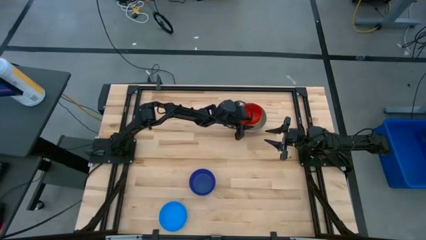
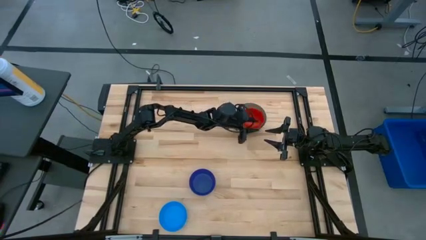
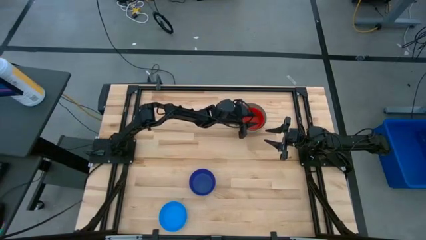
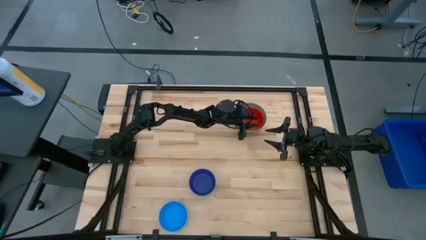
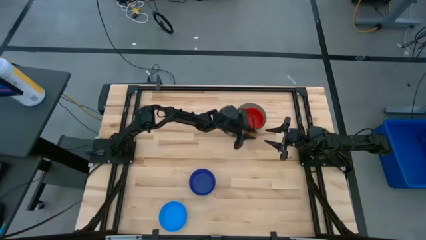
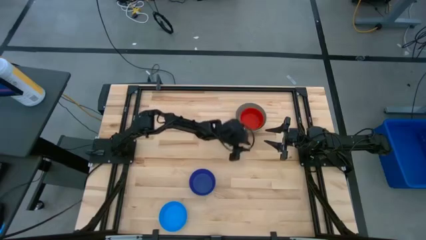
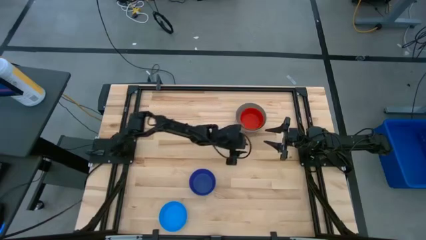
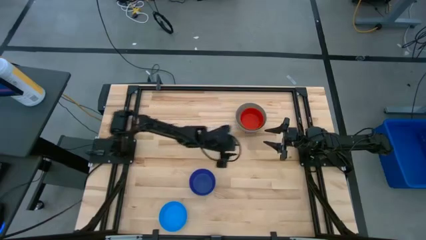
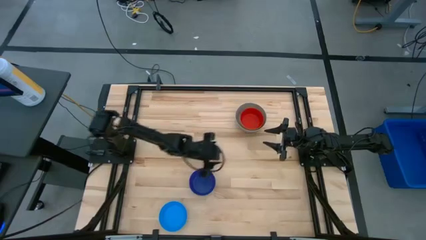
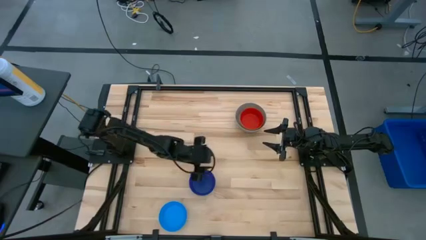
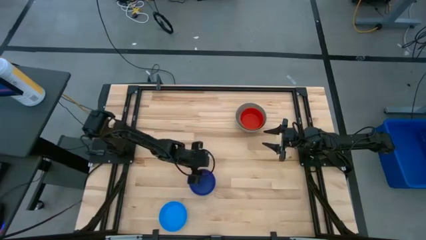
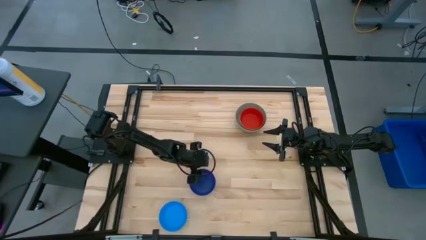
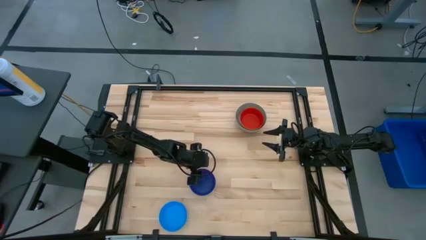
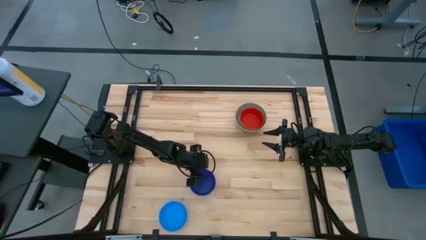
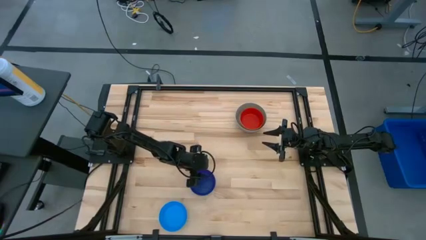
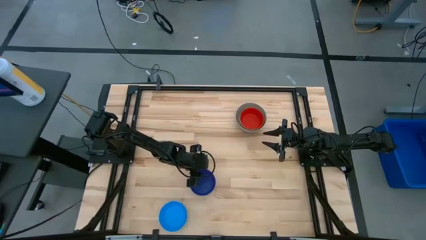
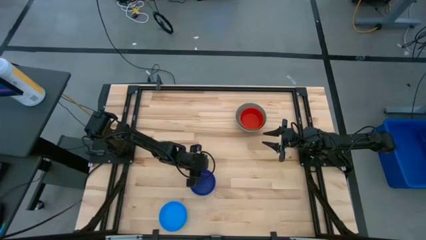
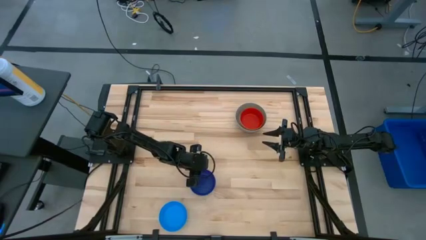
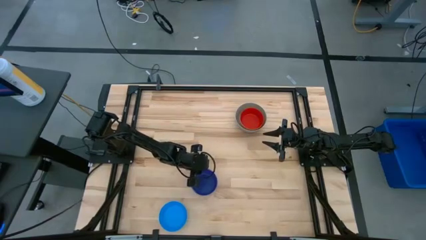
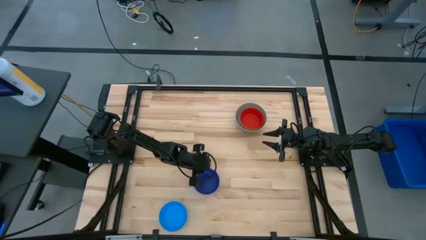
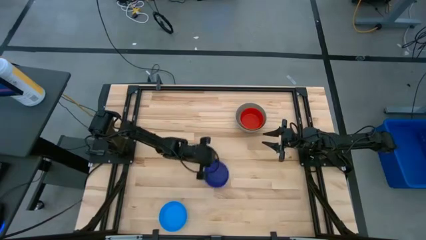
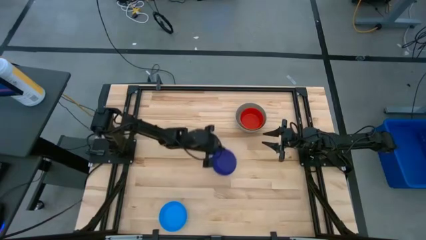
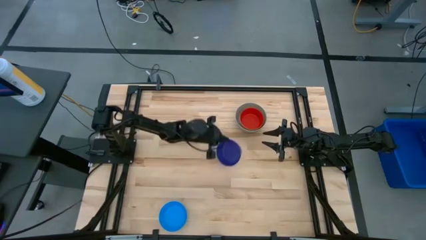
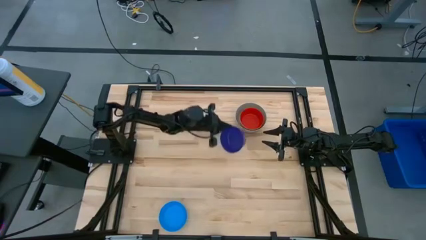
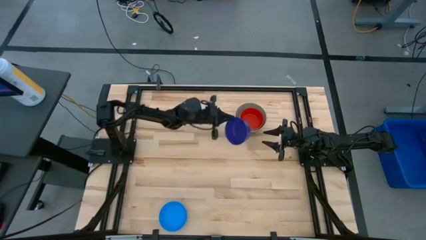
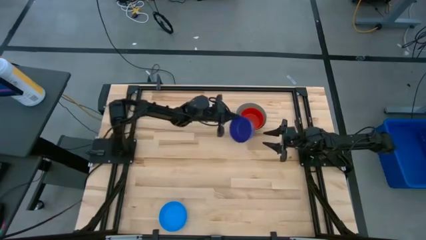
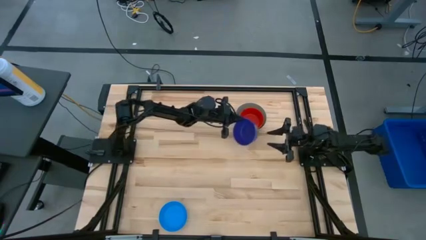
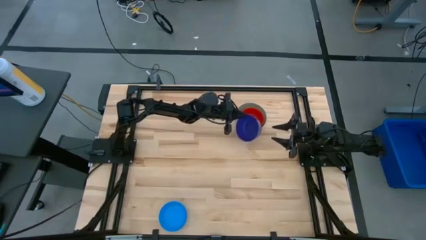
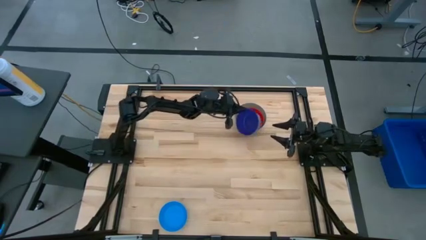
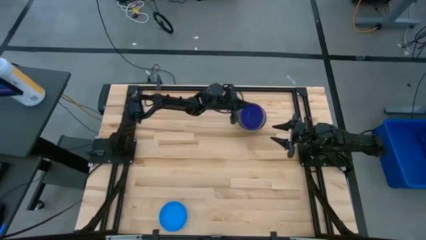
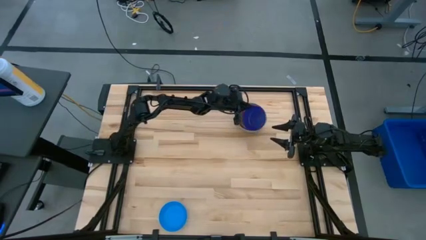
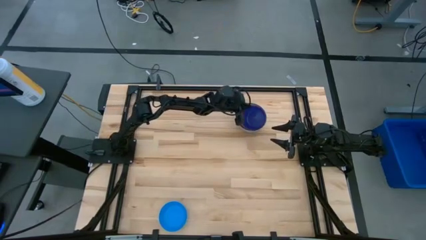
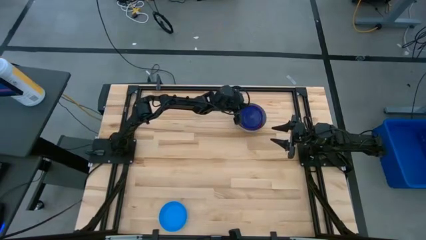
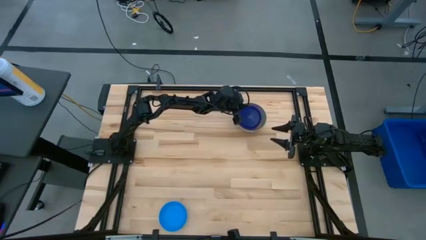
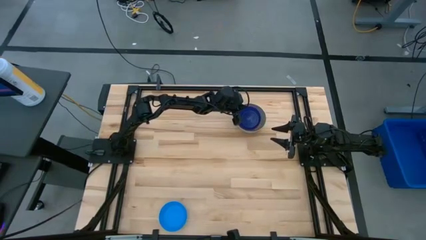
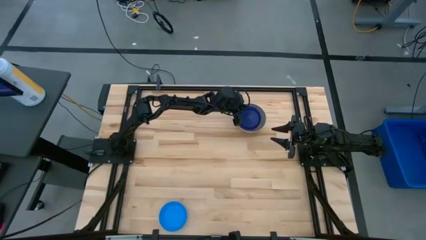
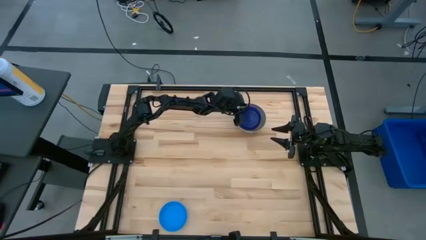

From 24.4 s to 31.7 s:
Stack the dark blue bowl on top of the red bowl

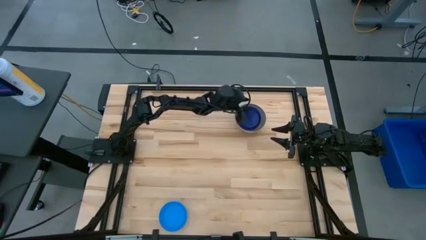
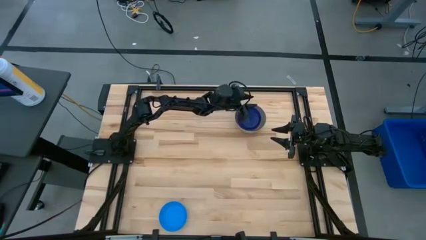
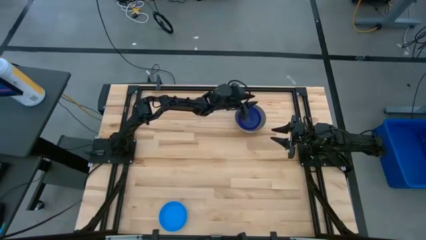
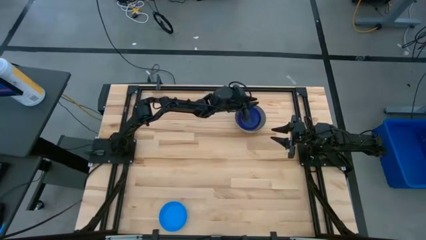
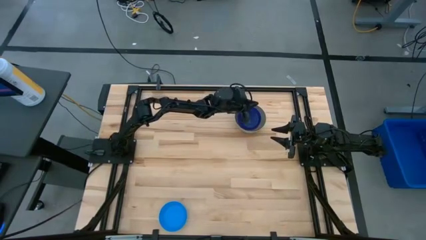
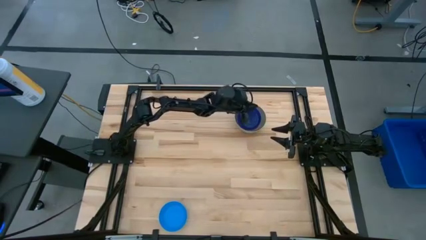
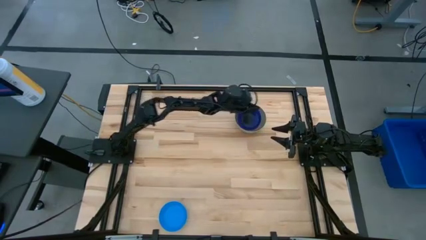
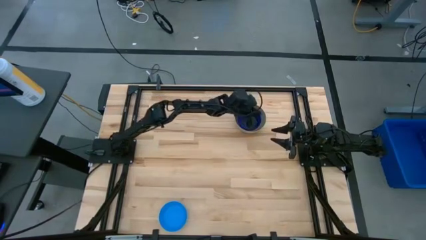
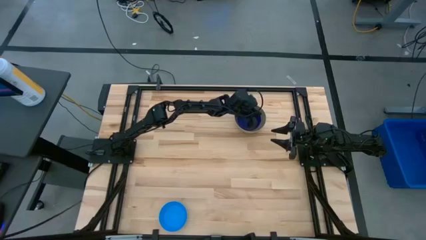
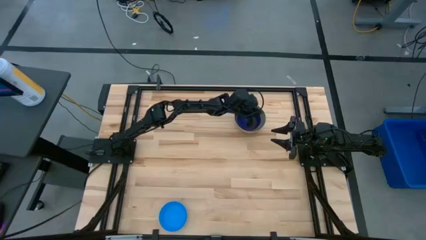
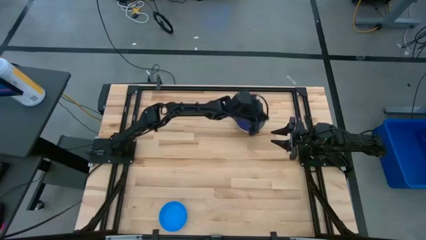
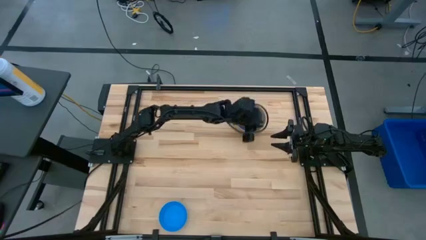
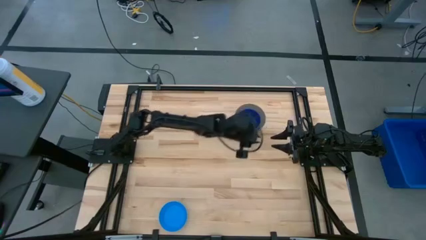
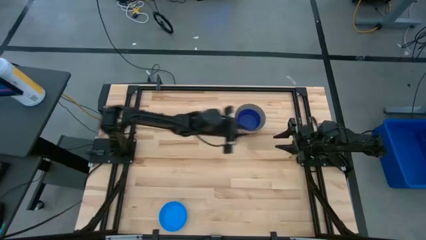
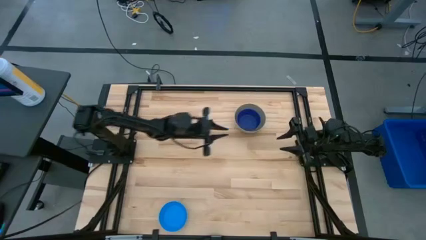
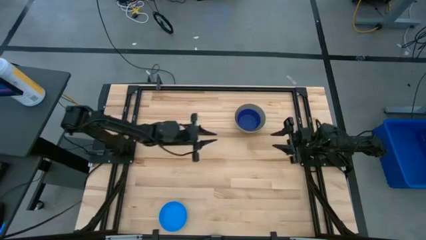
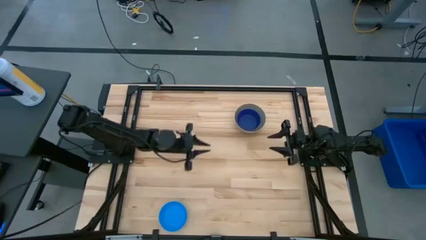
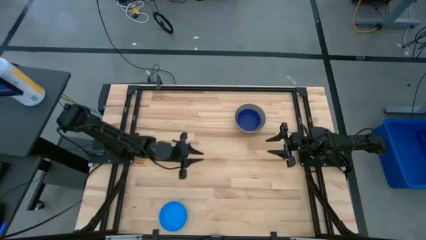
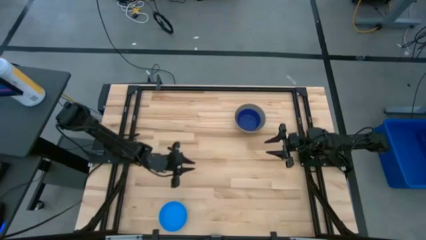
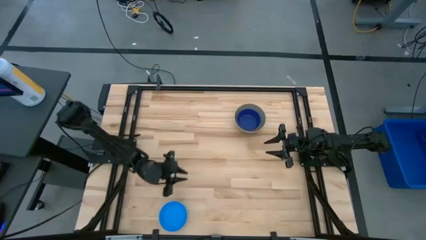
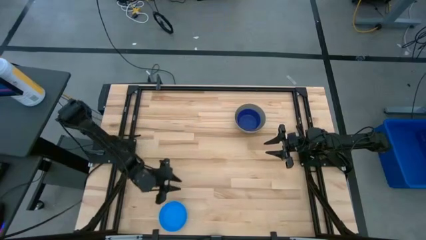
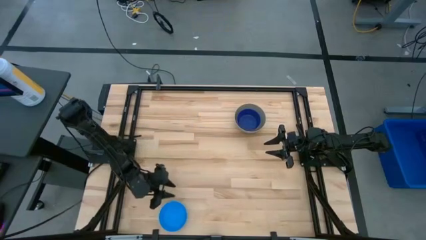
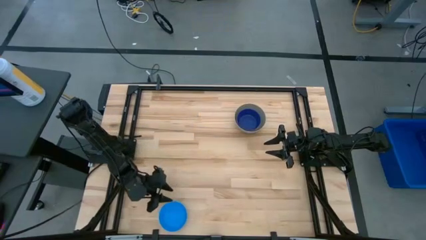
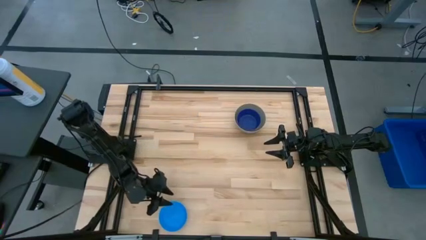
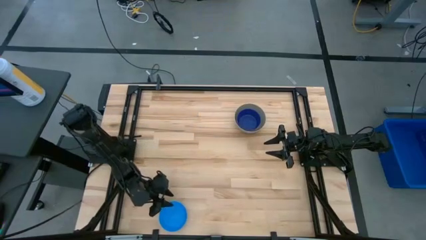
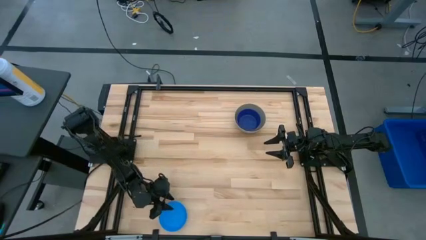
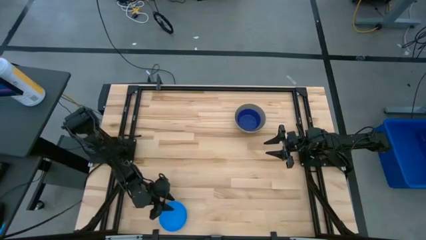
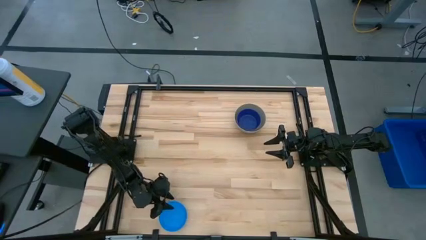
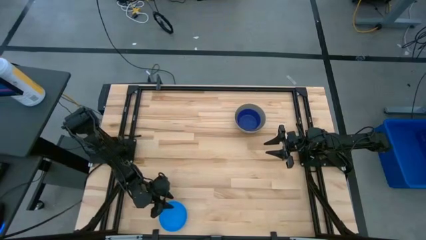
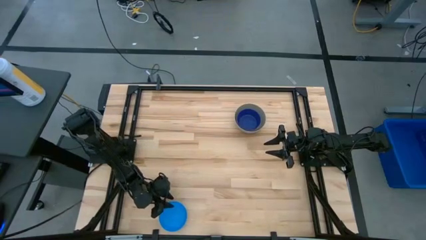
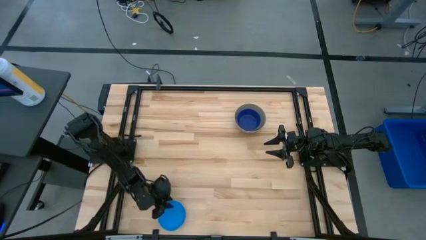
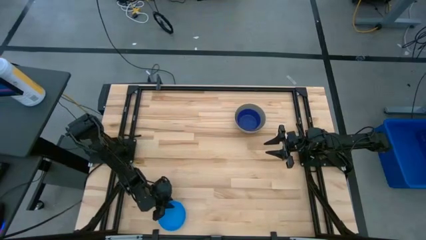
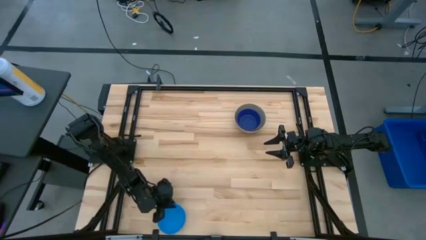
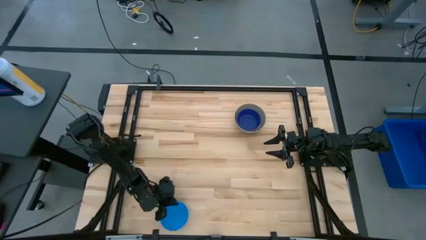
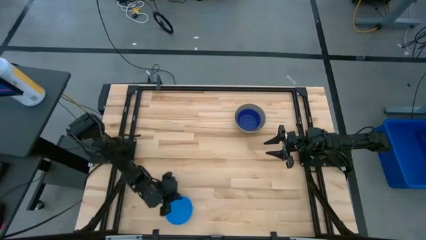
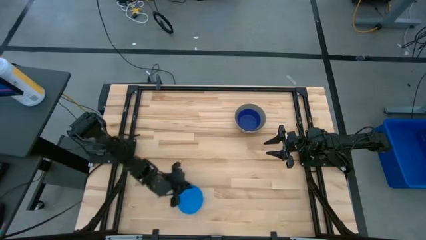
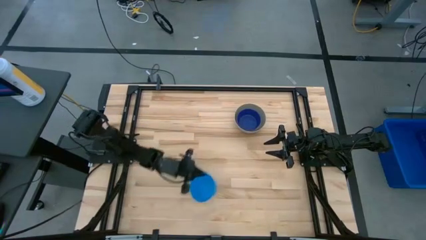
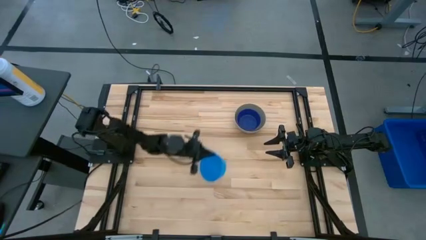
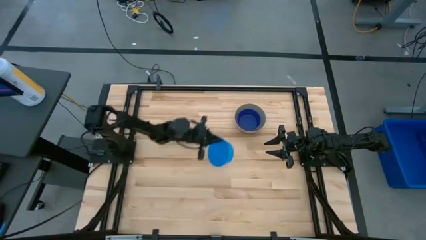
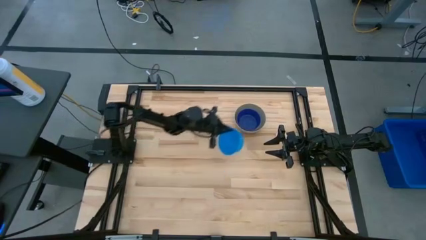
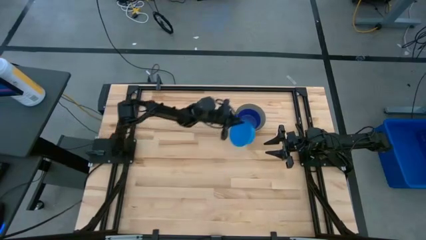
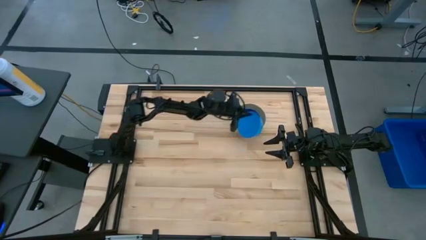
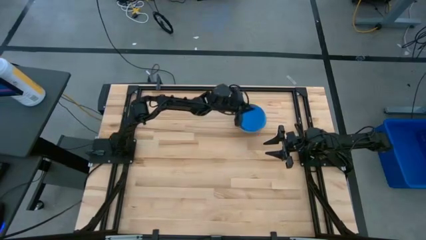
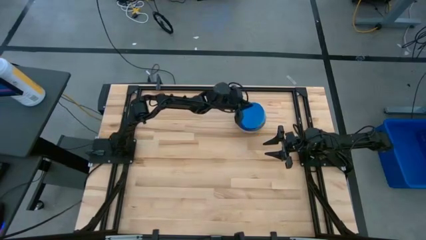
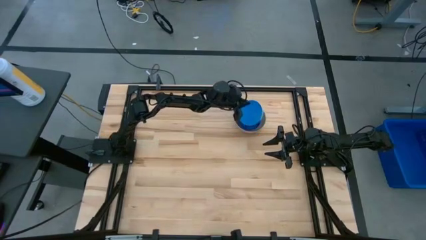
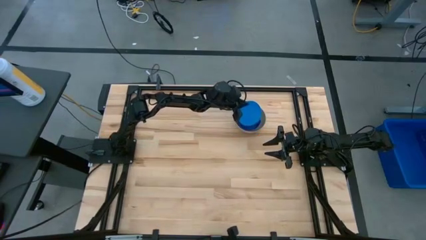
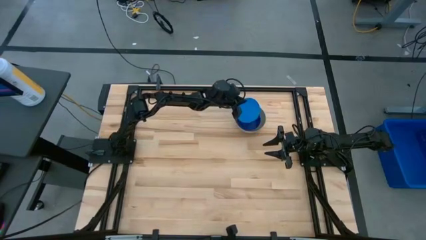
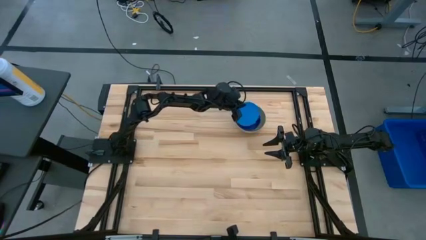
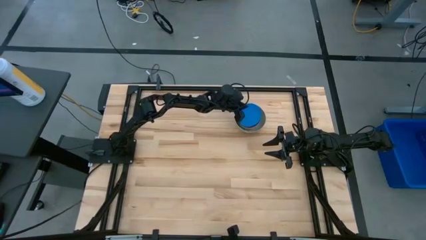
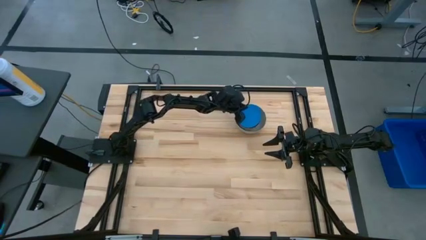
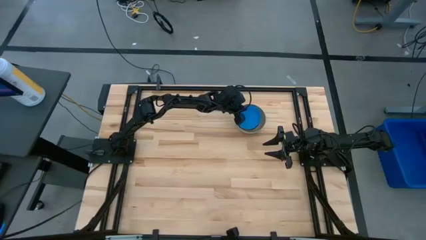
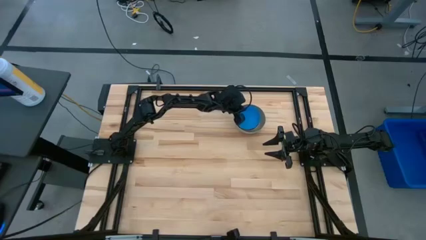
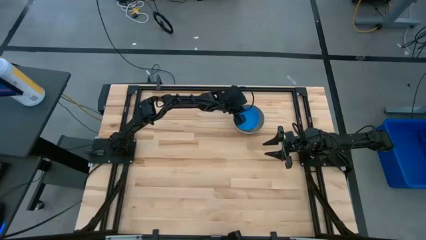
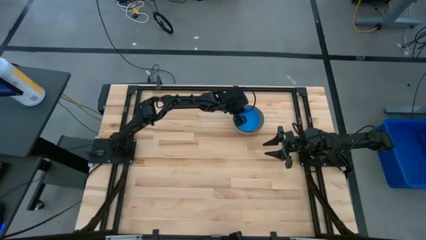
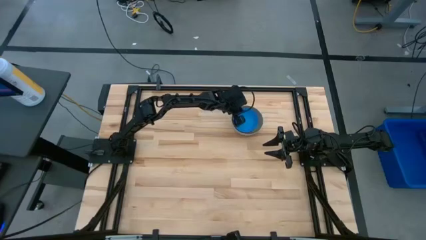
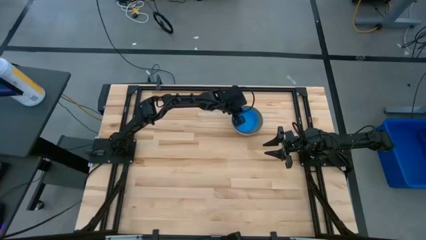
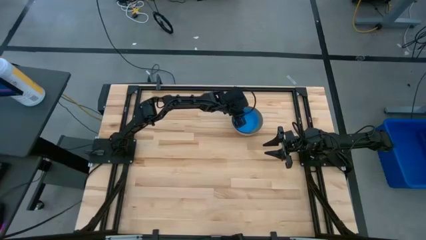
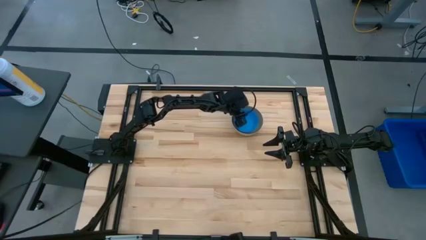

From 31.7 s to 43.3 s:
Stack the blue bowl on top of the dark blue bowl
